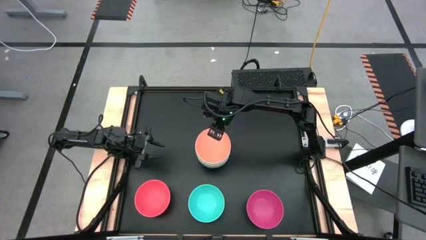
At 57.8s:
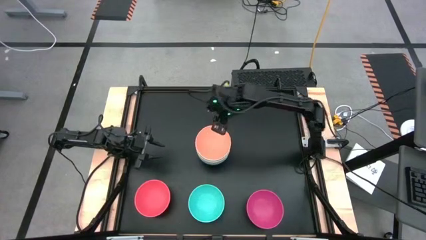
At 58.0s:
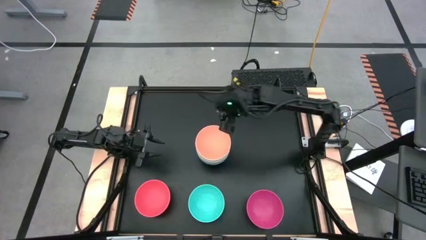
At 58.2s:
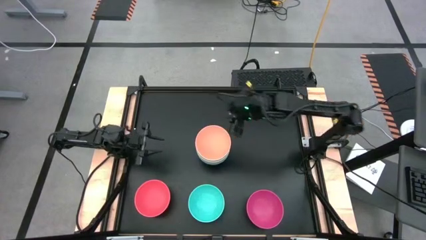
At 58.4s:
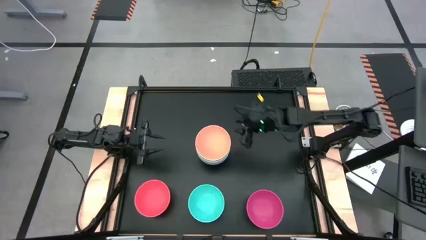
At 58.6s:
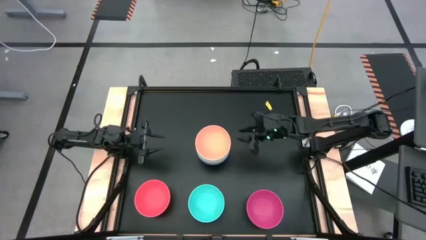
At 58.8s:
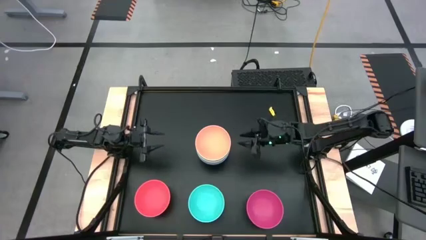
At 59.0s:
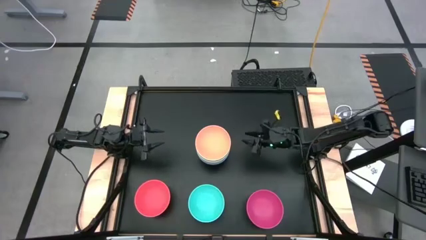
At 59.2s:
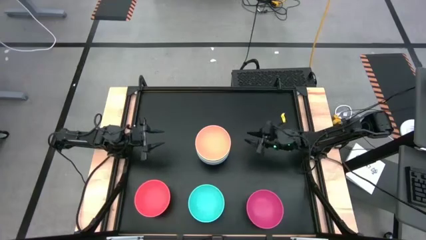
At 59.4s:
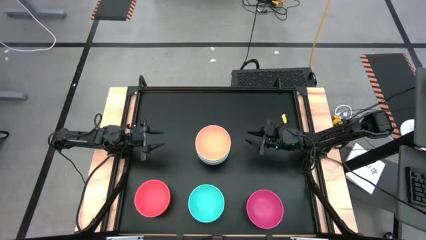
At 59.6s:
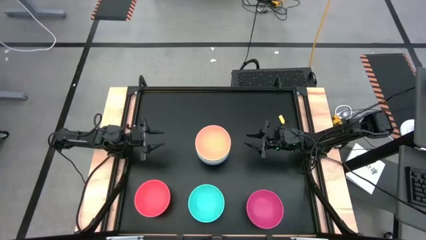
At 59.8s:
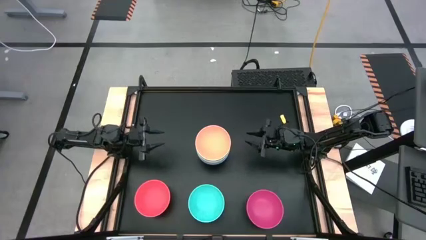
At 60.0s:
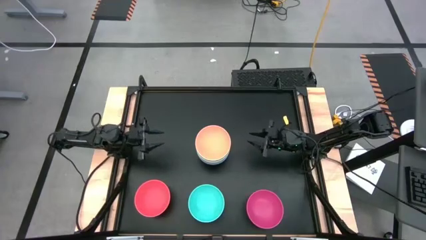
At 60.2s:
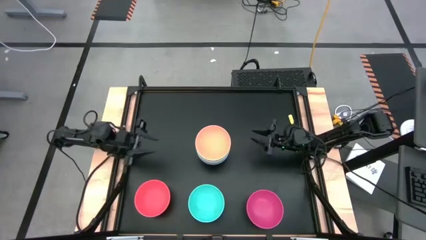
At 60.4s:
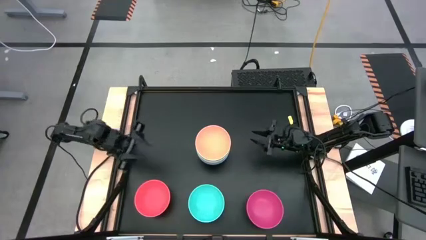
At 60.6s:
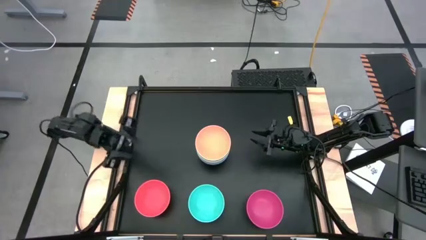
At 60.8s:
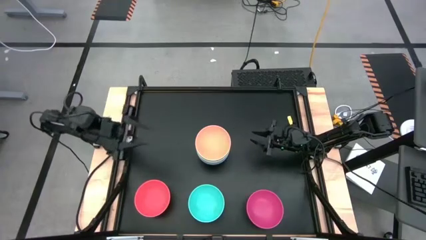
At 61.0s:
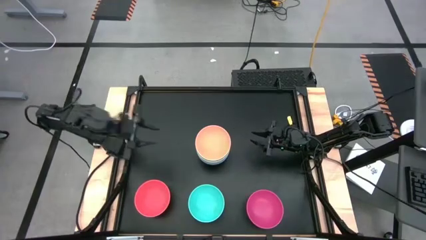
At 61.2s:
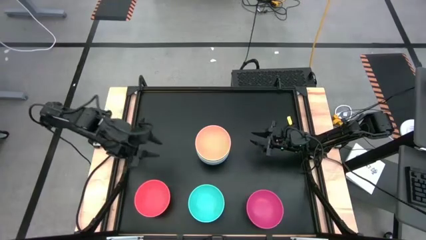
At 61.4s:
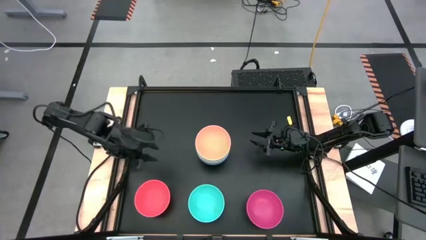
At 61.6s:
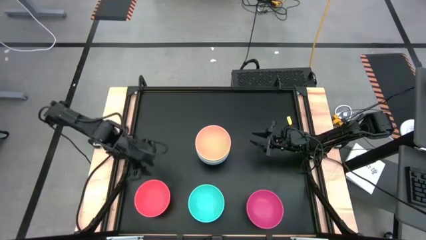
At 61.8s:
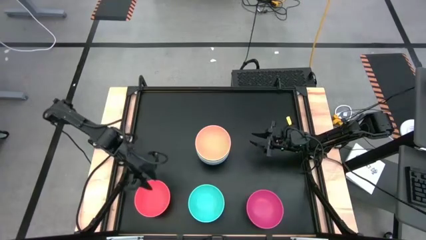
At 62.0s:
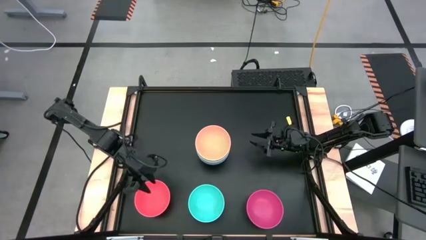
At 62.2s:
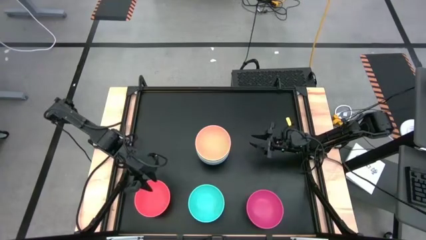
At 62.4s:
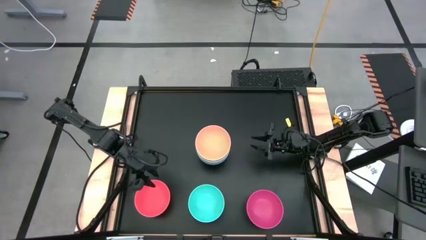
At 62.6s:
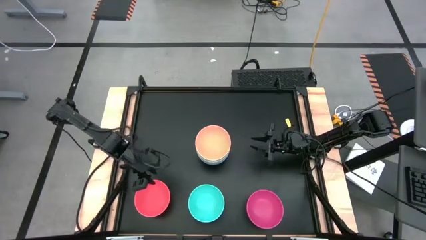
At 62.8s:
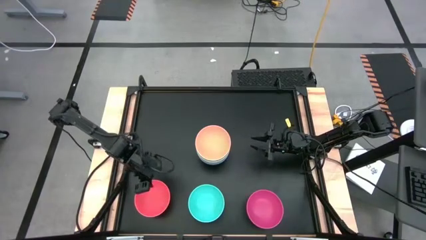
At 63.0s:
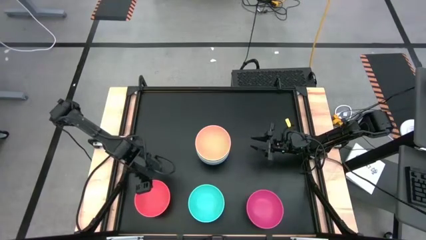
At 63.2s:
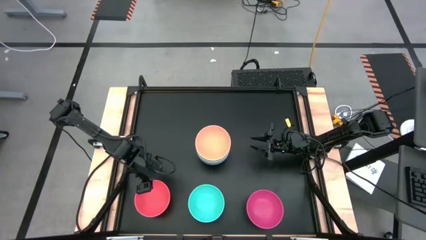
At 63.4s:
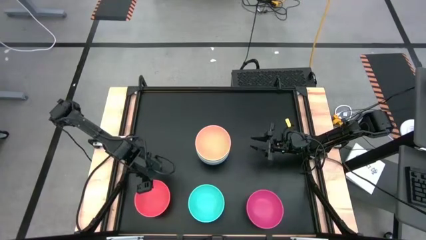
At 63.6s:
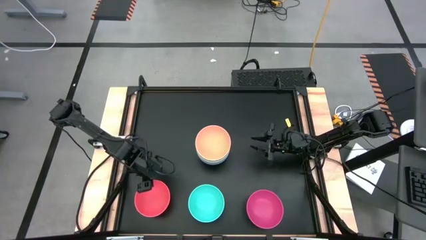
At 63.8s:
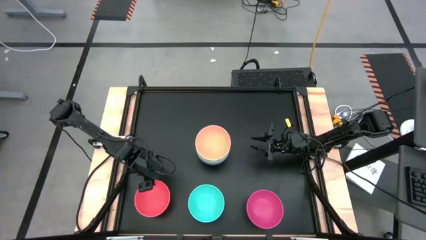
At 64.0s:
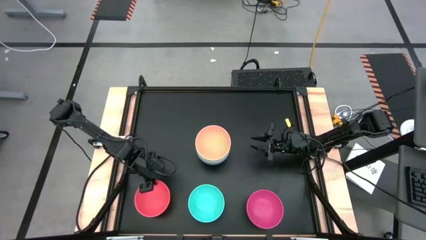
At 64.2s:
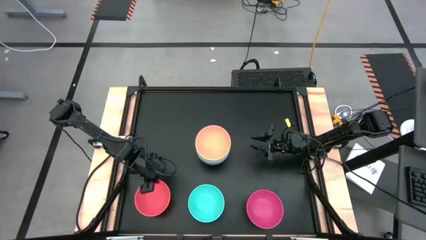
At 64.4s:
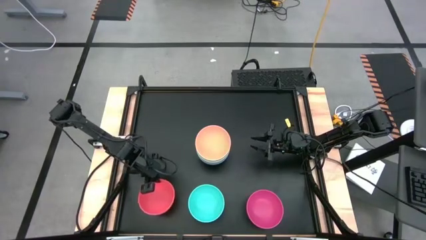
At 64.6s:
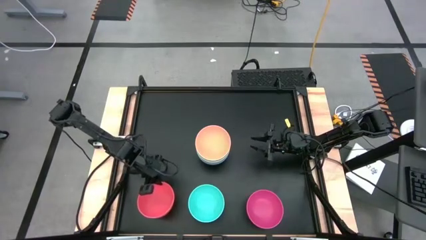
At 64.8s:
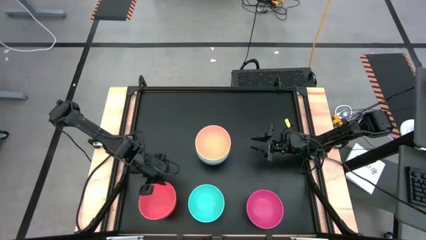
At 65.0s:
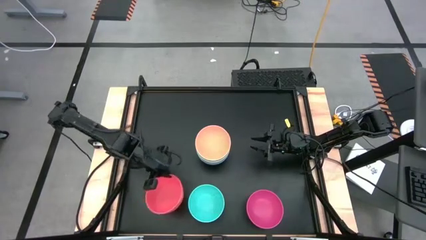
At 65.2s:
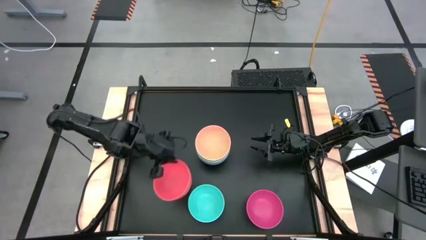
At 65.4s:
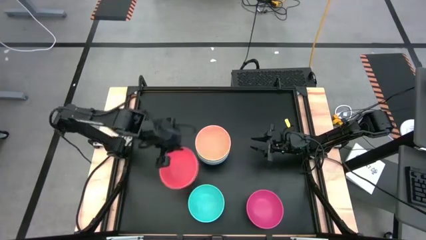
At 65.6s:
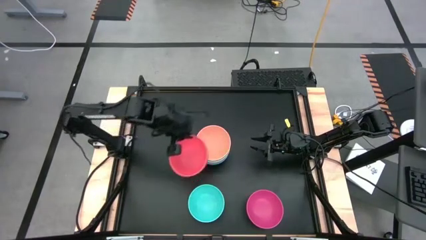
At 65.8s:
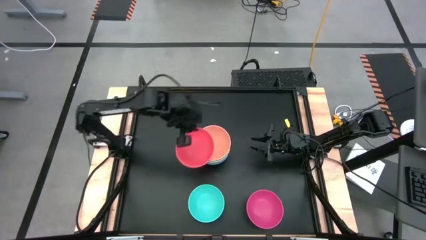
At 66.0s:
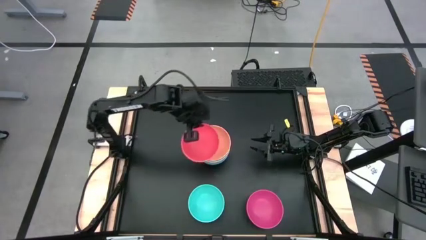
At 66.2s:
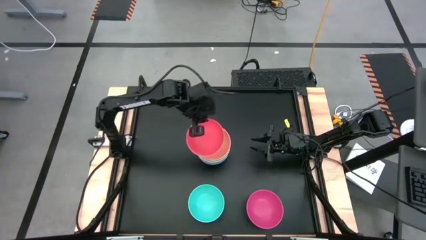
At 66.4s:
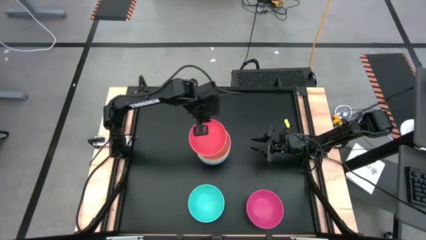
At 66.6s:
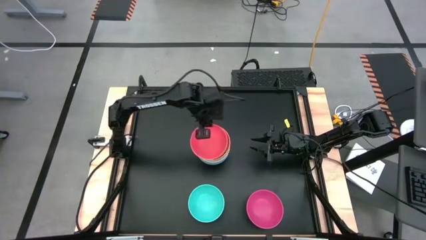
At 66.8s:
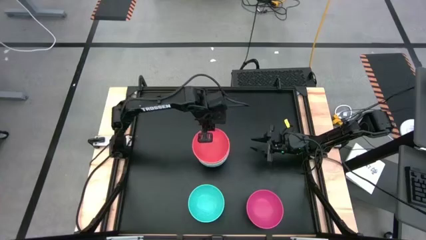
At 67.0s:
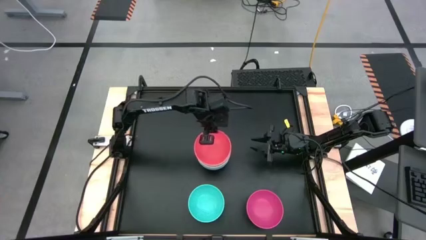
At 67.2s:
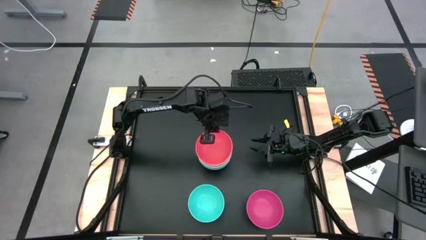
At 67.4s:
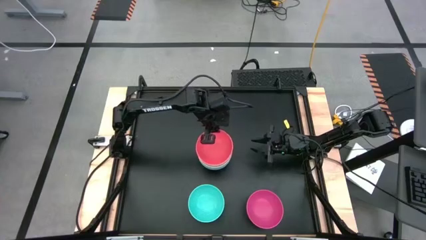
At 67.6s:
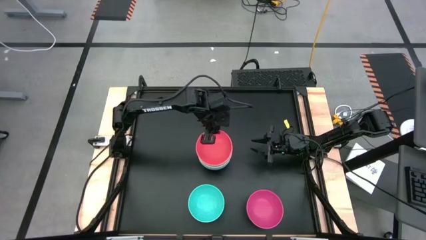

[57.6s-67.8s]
Task: Nest bowls inside each other
Stack the red bowl on the orange bowl

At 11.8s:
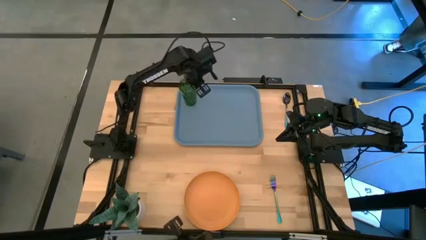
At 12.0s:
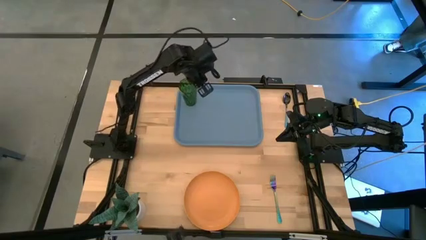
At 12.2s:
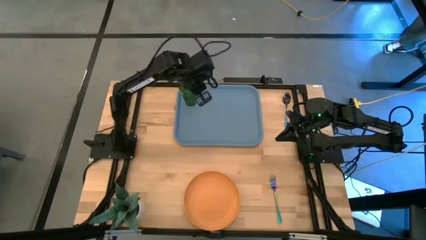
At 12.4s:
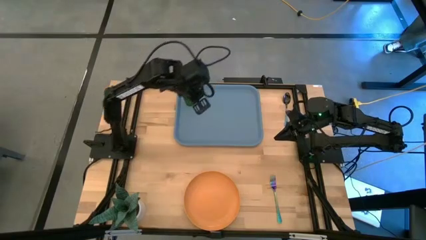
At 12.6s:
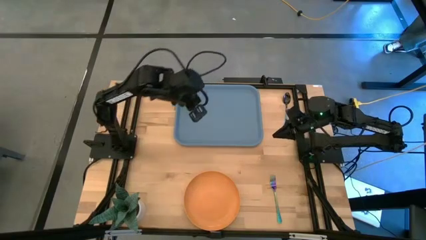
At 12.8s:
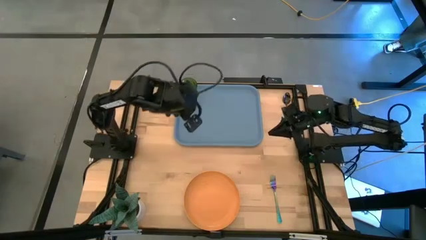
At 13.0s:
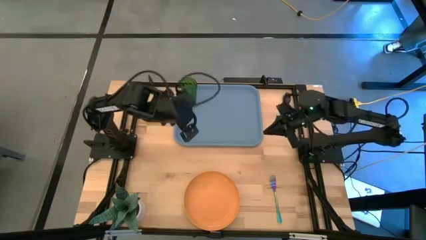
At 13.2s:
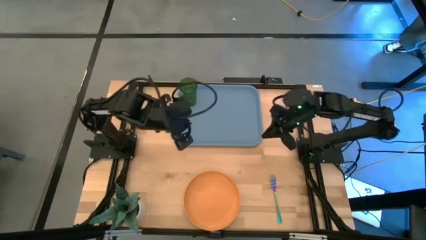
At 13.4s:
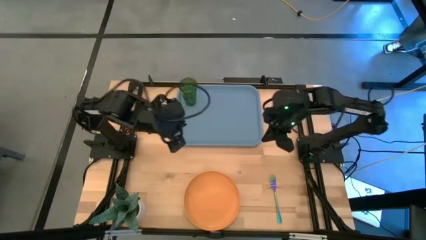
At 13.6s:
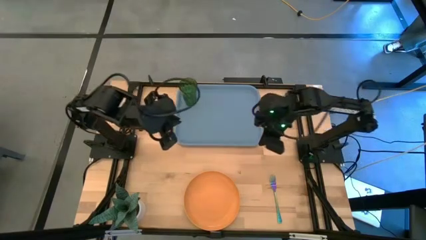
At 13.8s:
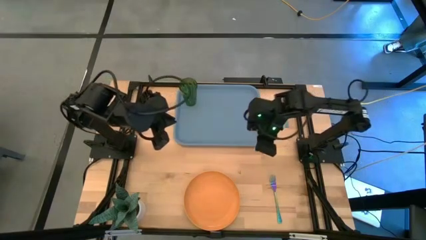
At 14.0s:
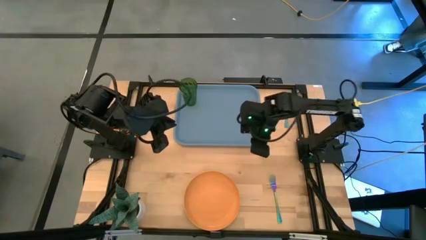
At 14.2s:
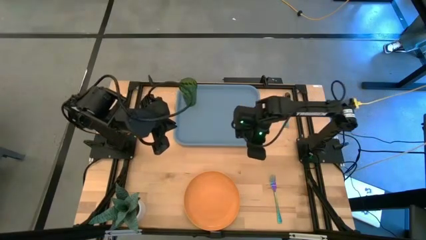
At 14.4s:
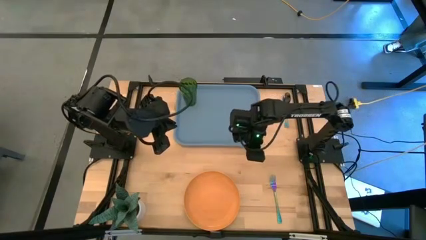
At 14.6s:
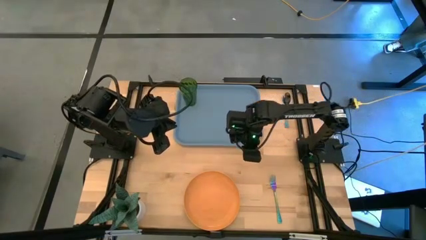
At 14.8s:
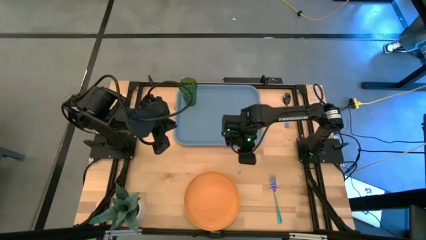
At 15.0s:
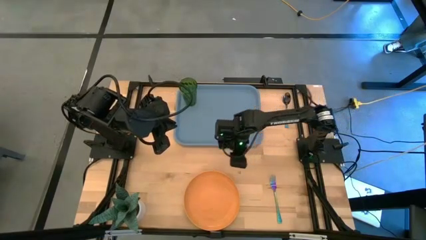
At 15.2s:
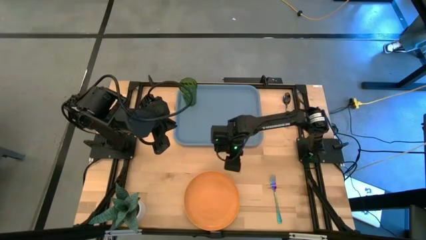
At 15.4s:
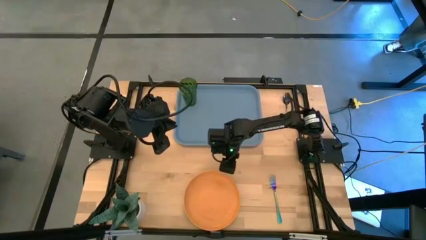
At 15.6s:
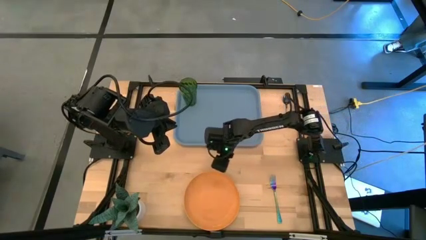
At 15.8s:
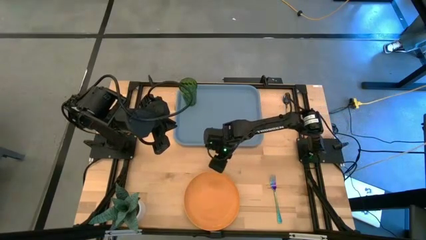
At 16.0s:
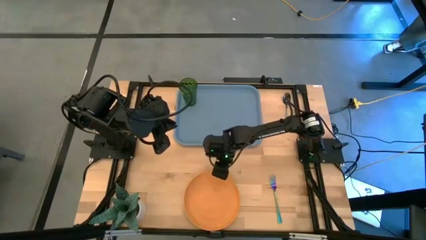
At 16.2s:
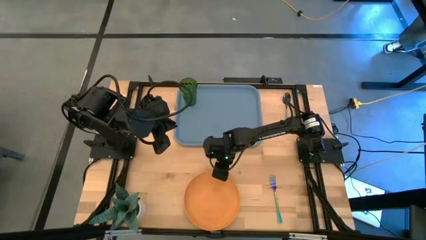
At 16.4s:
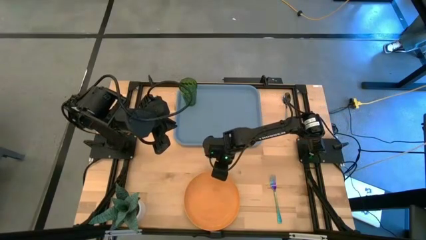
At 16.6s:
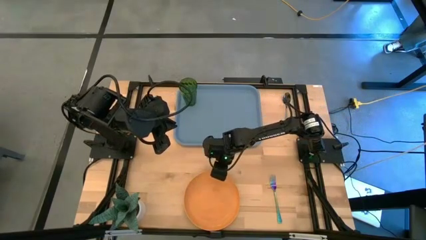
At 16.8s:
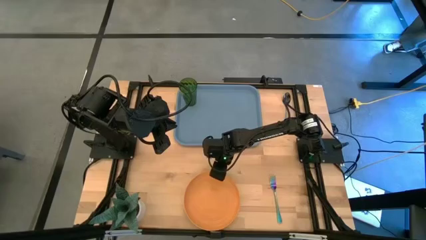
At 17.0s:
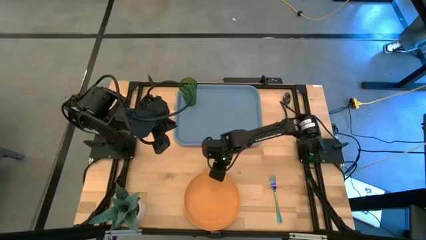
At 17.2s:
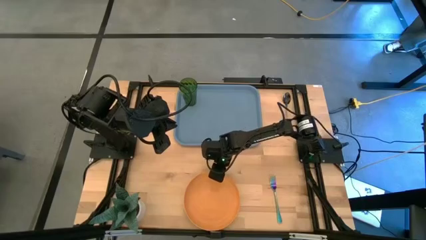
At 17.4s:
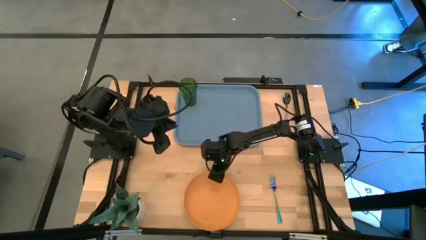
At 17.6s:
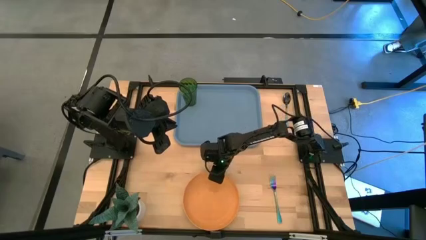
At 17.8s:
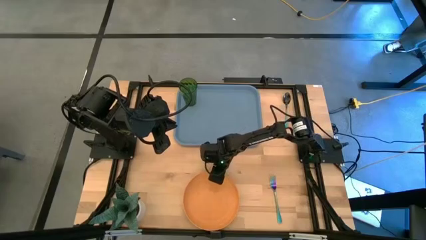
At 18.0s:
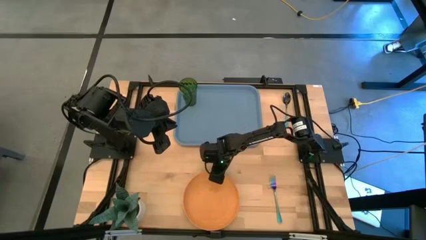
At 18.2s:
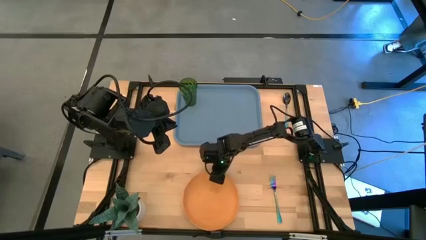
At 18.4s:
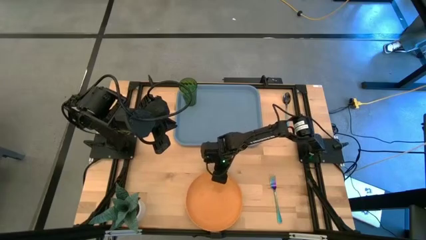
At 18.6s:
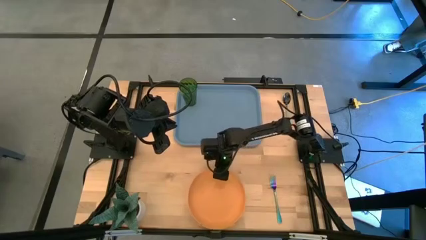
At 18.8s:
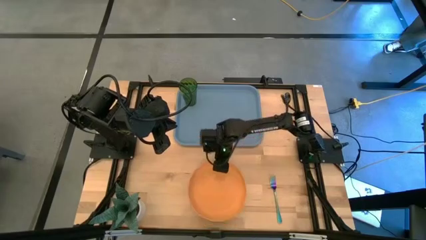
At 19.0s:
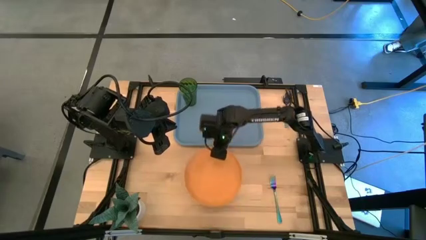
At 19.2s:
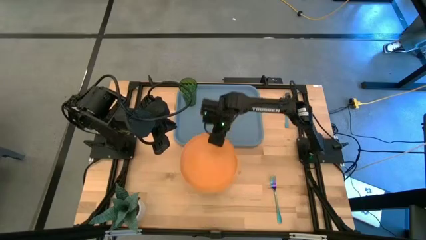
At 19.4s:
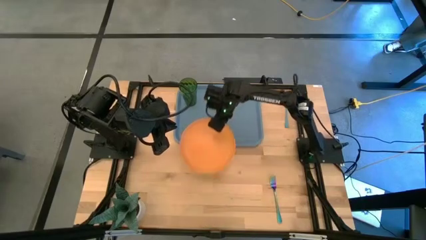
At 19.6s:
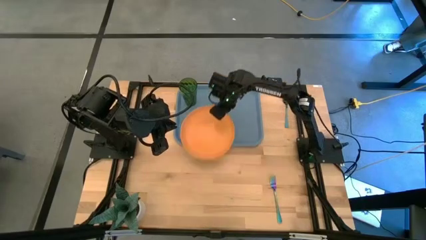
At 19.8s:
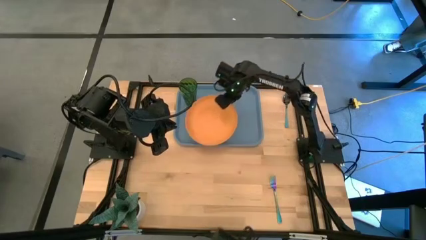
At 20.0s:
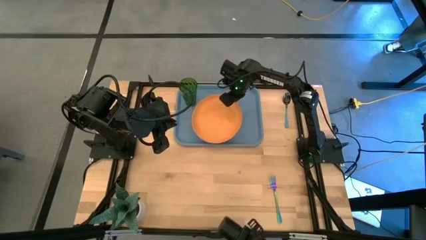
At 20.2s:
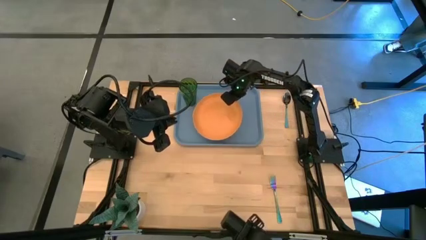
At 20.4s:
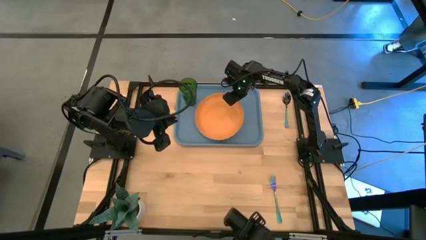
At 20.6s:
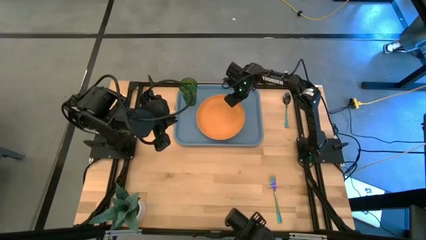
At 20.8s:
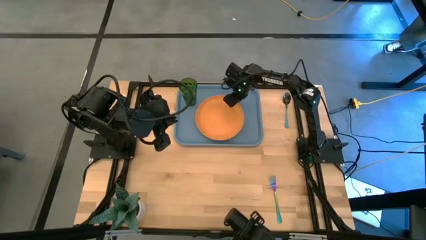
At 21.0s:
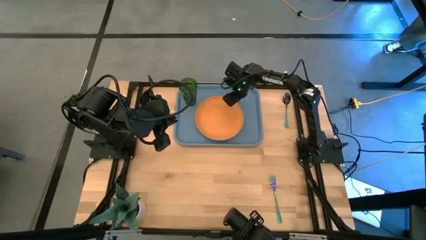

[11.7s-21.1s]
Task: Pick and place plate/cup/fork/spoon on tray
Put the orange plate on the blue tray
